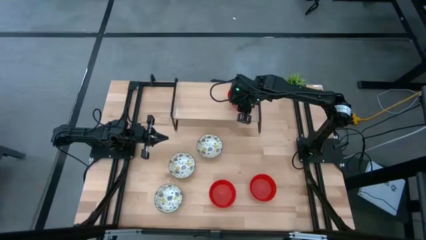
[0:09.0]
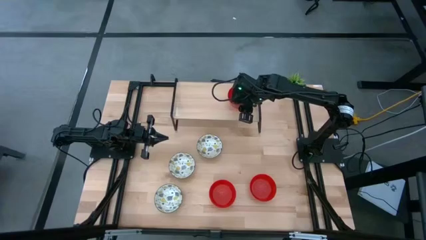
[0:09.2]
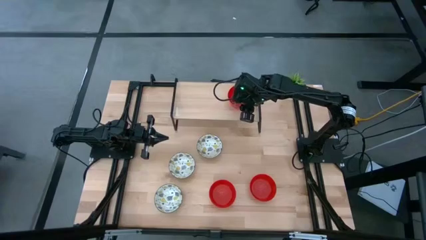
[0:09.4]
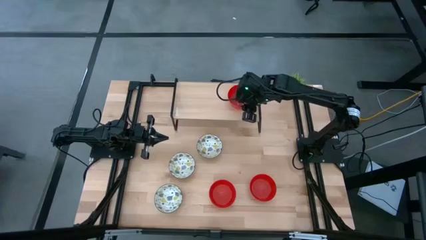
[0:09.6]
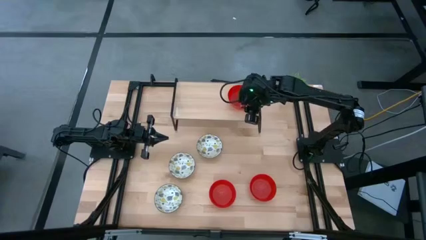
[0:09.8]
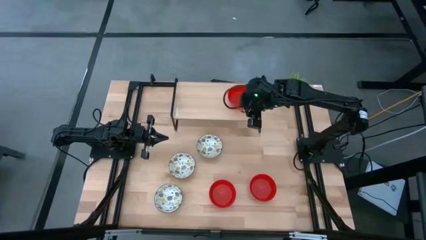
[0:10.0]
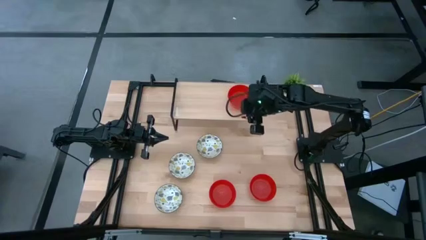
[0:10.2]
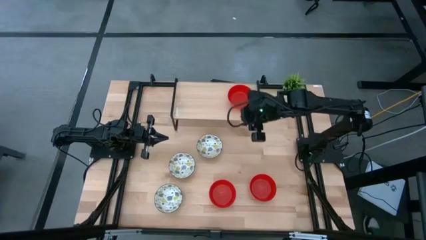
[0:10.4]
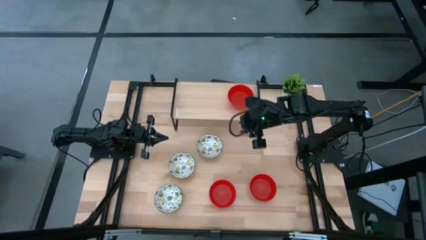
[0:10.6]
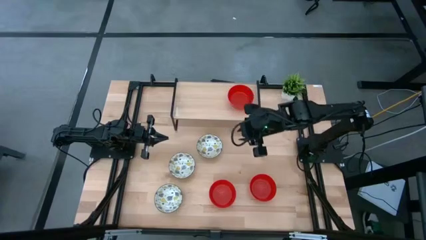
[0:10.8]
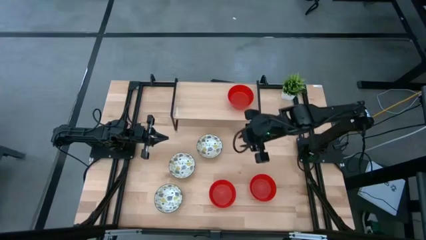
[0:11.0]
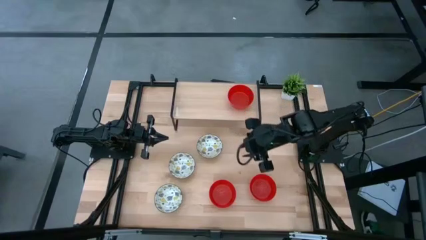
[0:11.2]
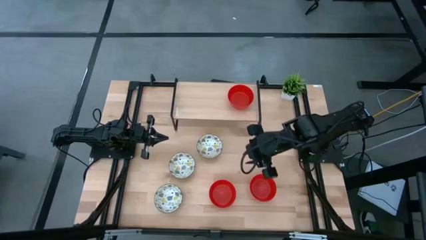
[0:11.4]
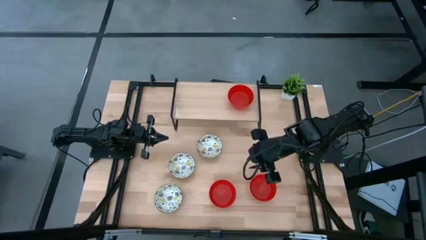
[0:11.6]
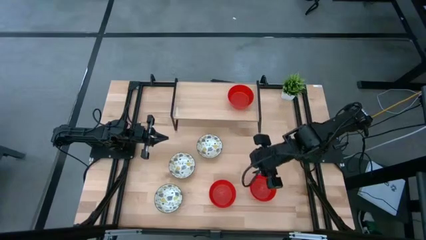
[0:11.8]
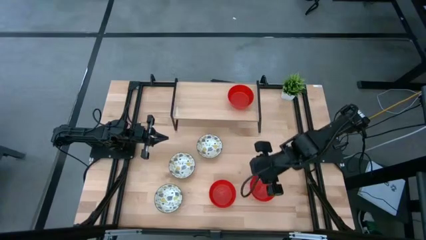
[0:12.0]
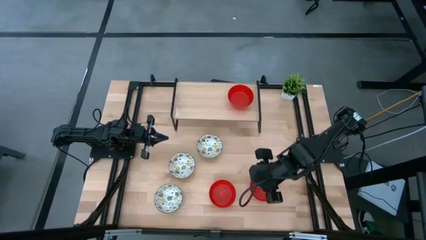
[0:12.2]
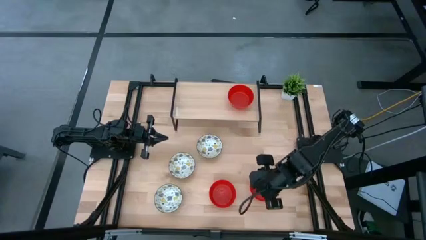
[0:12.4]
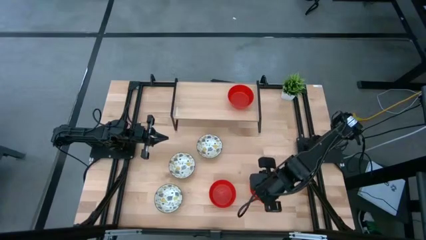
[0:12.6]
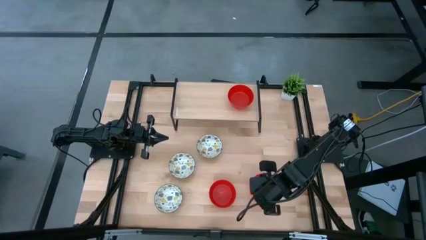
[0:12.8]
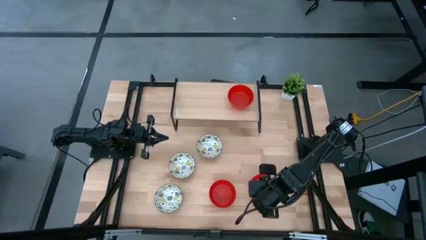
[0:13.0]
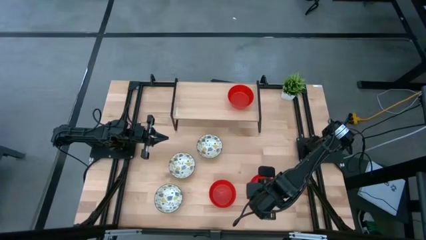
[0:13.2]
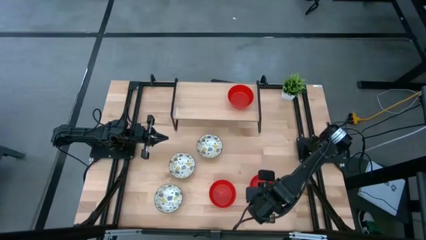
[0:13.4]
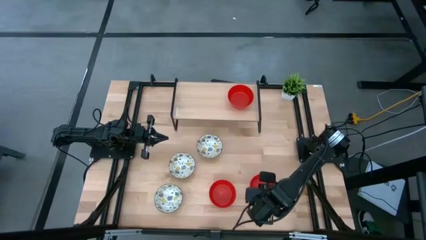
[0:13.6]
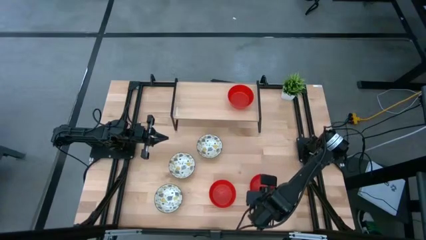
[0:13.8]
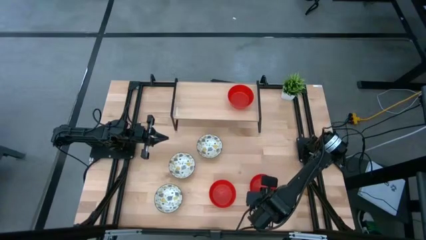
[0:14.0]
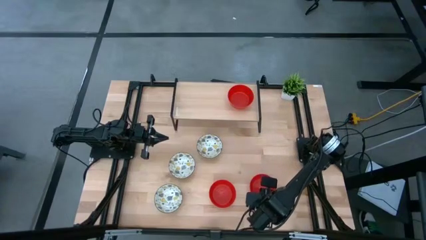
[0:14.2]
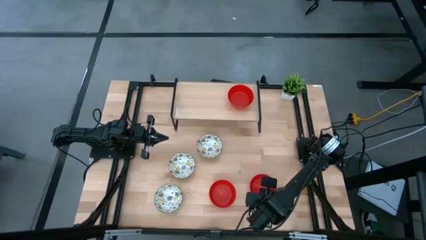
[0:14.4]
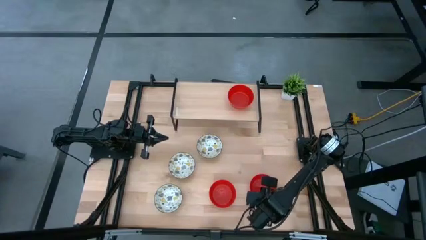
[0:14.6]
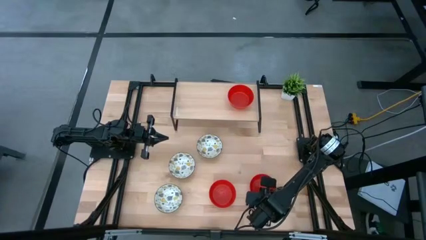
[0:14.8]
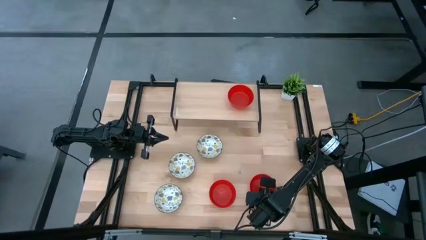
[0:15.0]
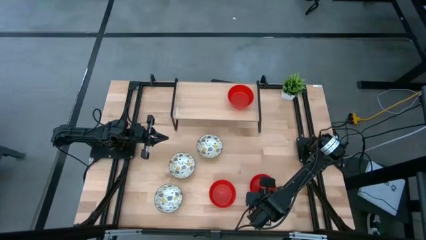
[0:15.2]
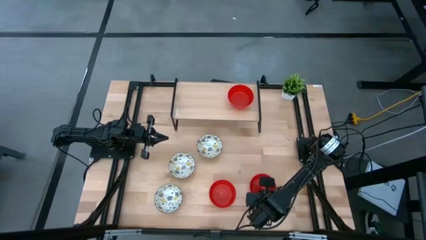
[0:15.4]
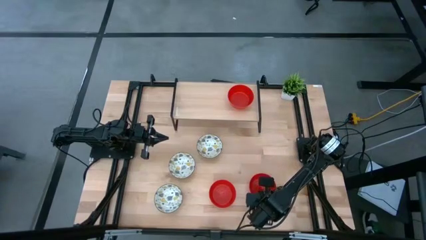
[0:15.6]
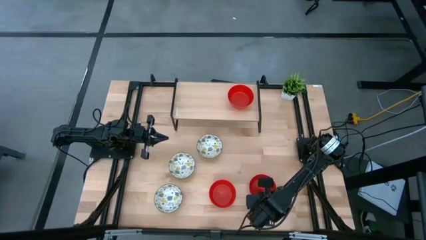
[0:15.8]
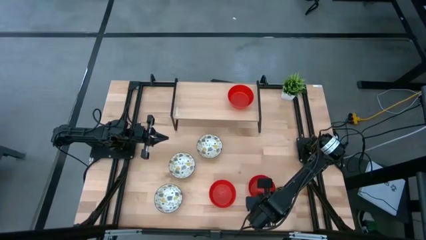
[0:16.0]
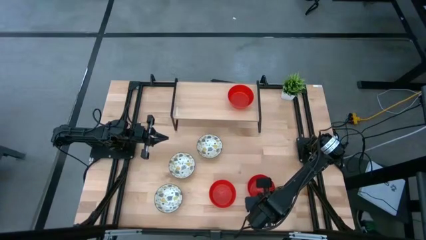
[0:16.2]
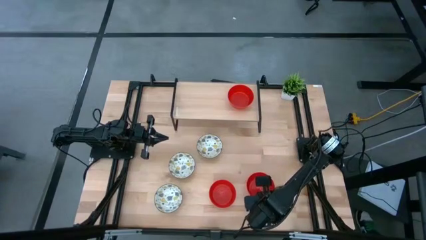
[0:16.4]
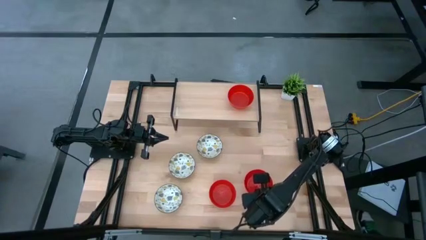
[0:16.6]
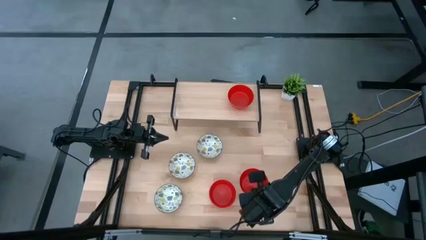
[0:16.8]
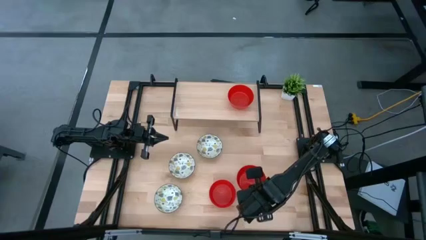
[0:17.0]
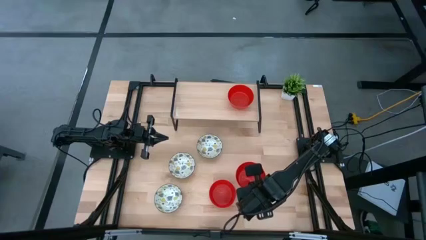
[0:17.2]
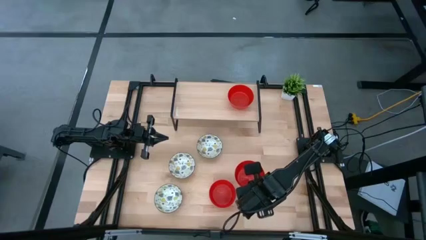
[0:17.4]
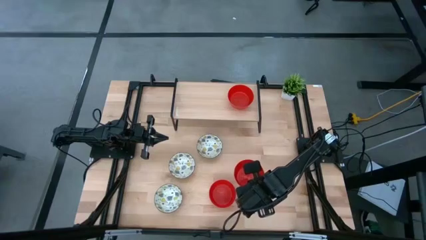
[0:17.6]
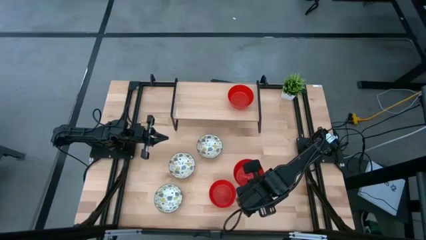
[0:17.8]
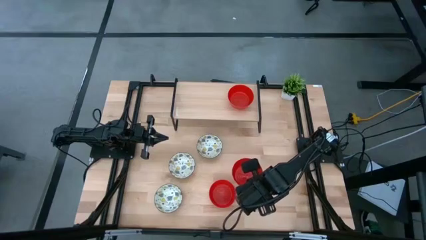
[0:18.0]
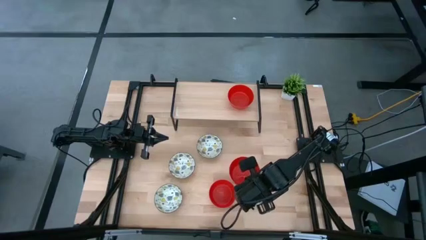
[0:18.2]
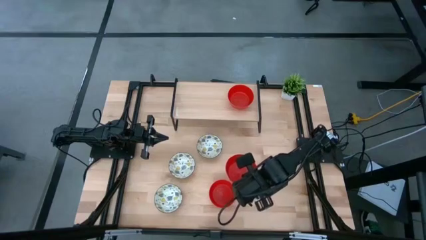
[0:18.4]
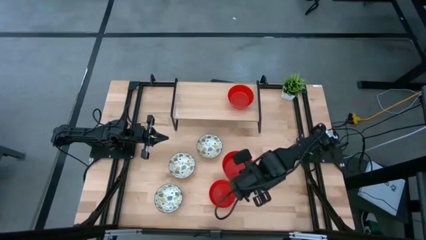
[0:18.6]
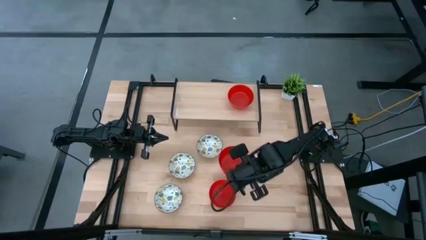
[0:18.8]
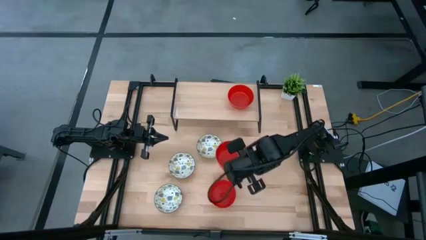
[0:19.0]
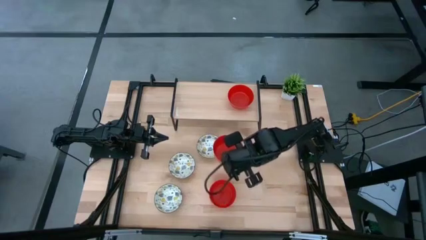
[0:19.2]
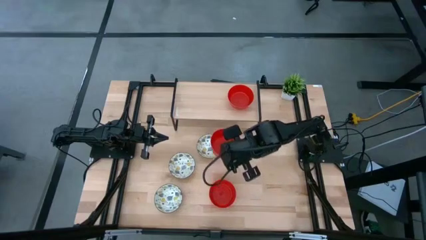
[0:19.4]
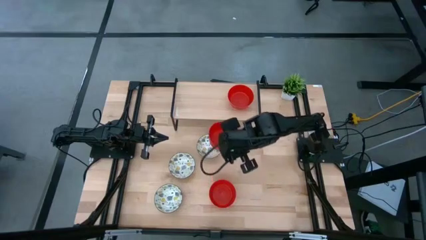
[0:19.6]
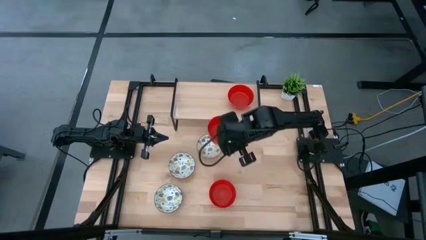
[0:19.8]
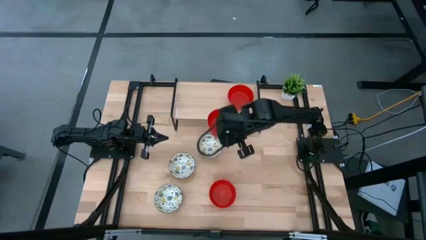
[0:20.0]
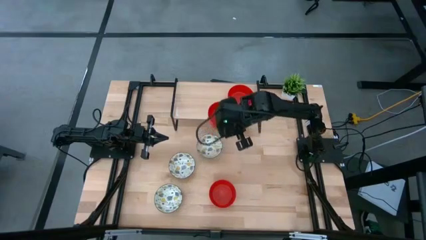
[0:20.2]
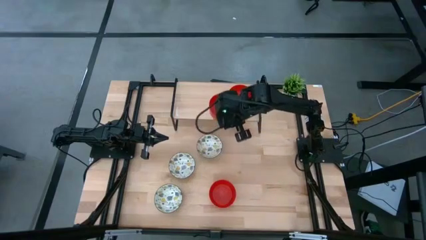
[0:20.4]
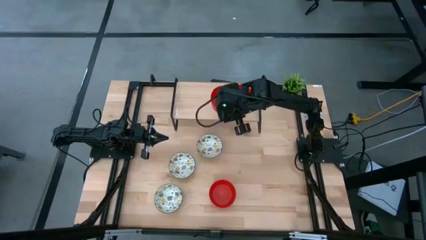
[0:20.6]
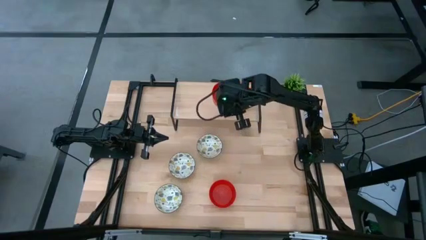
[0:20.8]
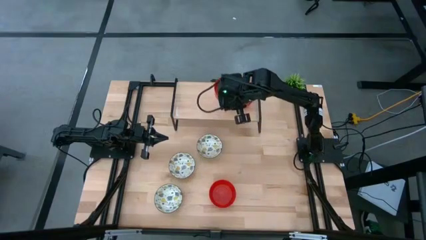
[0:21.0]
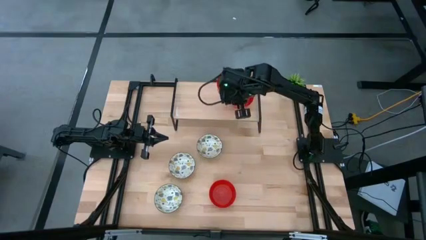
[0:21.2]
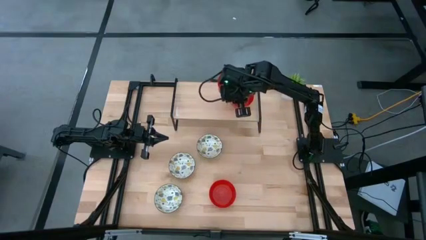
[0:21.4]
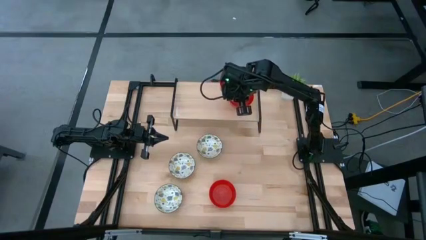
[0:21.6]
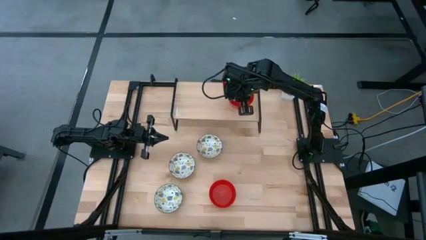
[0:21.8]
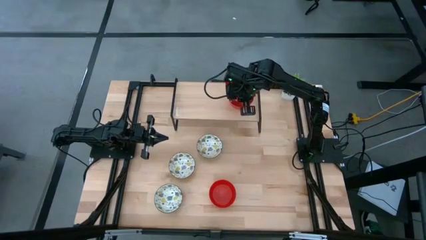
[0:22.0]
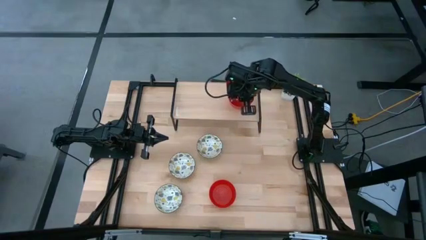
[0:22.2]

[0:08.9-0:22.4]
Task: Pick & Place Mini bowls
Stack the right red bowl on top of the red bowl on the shelf
